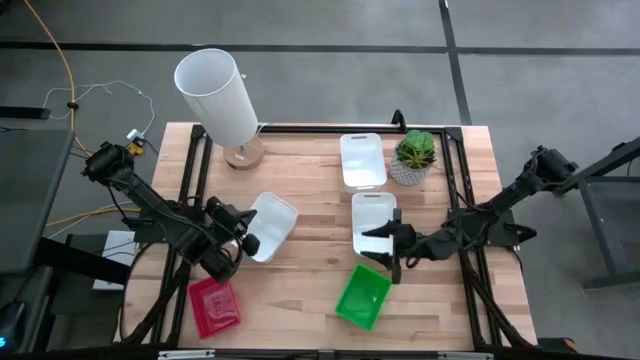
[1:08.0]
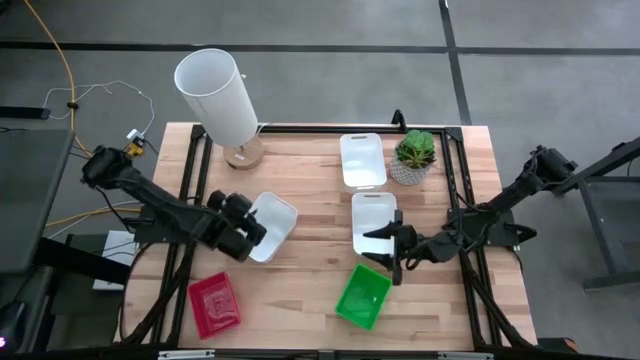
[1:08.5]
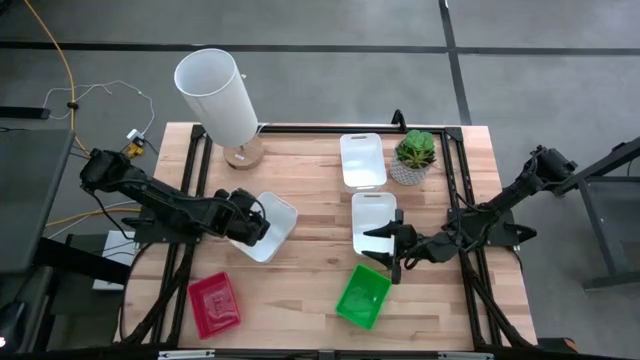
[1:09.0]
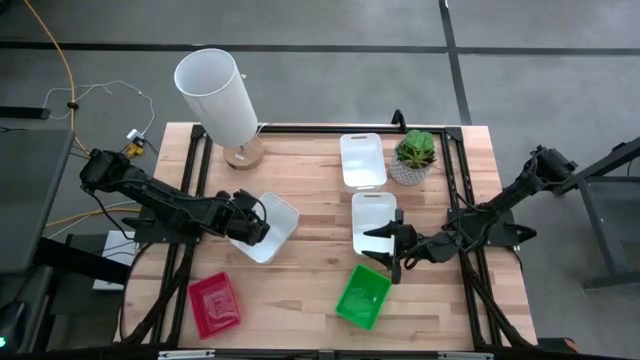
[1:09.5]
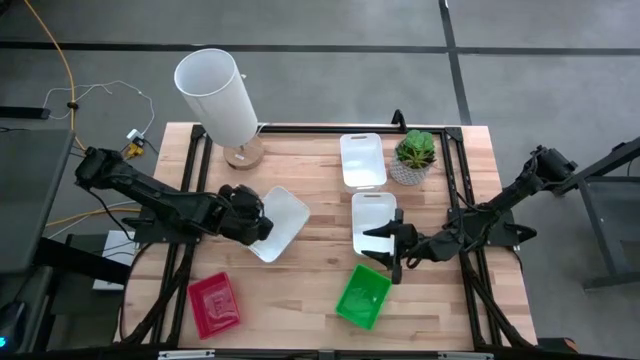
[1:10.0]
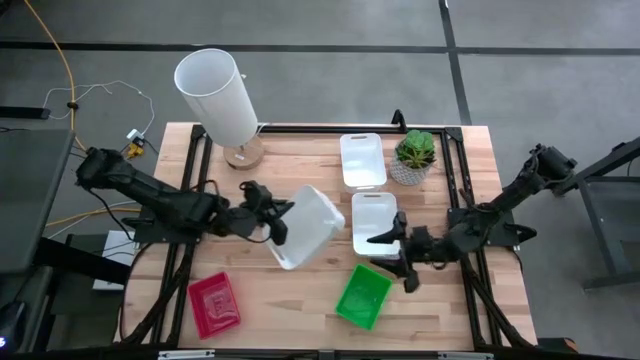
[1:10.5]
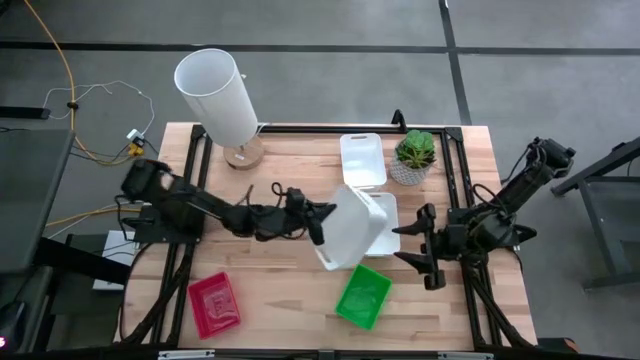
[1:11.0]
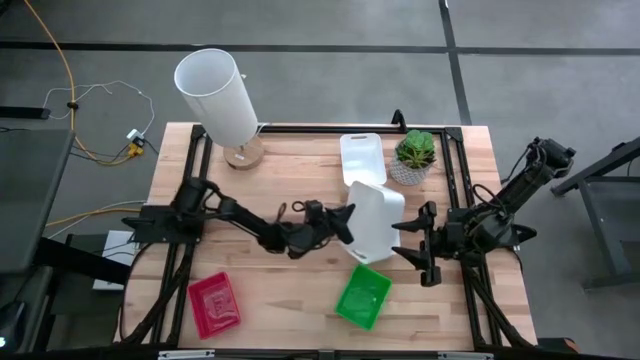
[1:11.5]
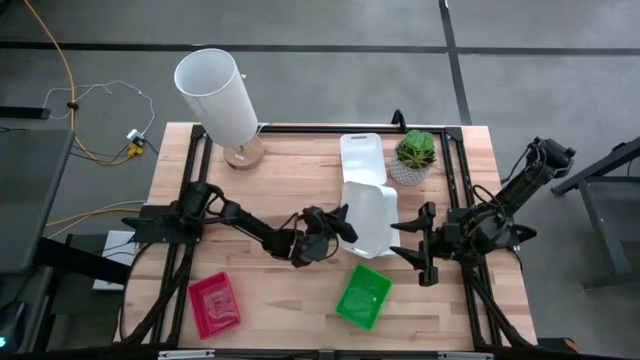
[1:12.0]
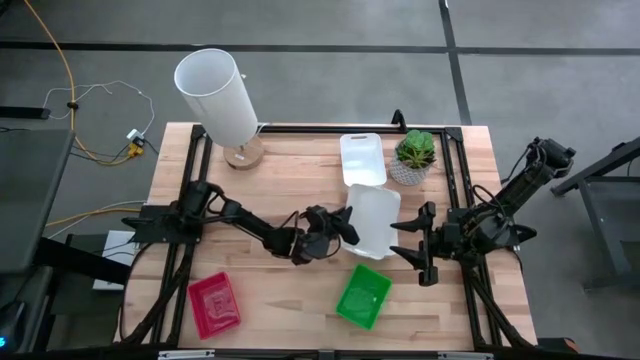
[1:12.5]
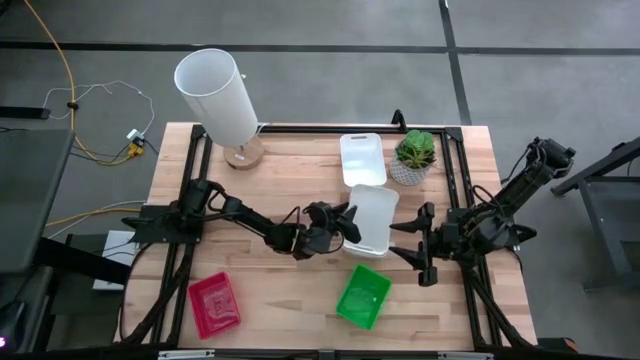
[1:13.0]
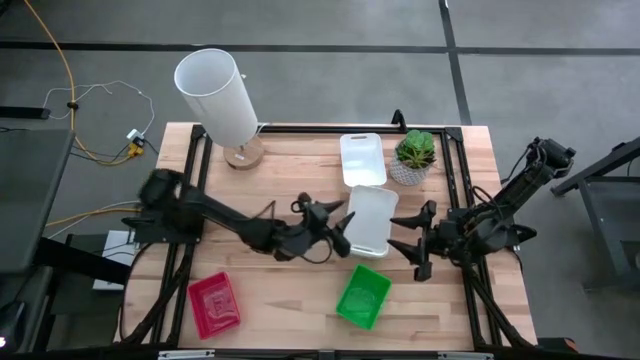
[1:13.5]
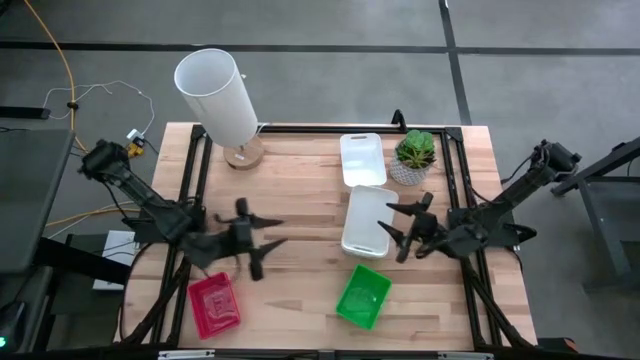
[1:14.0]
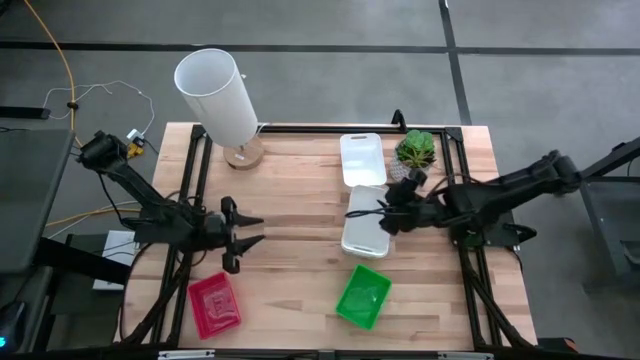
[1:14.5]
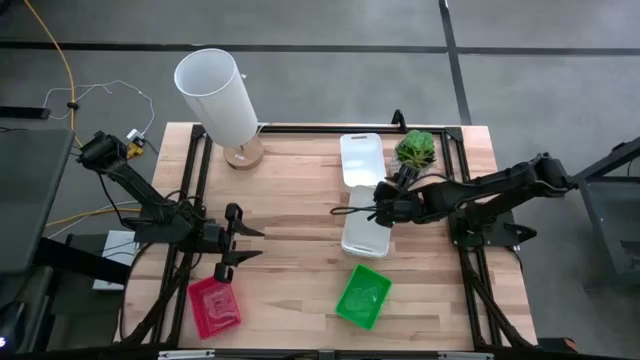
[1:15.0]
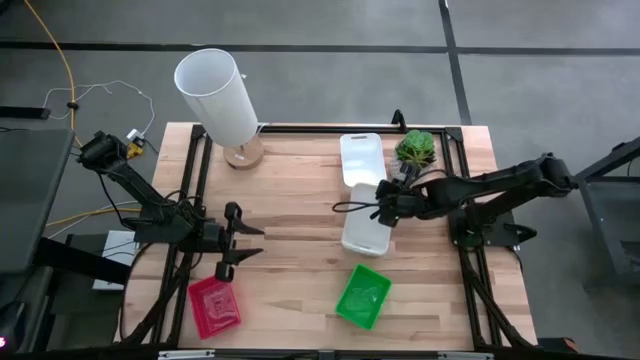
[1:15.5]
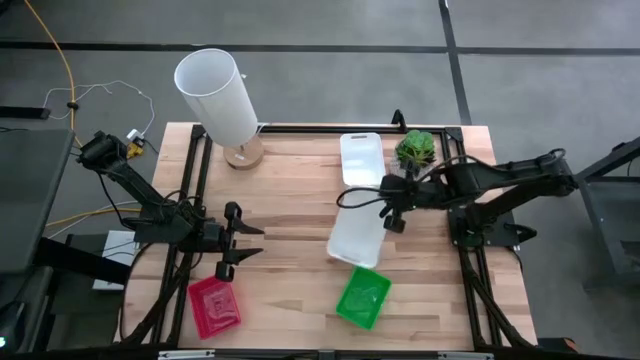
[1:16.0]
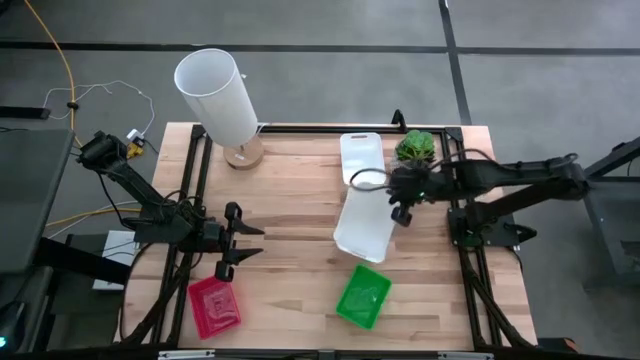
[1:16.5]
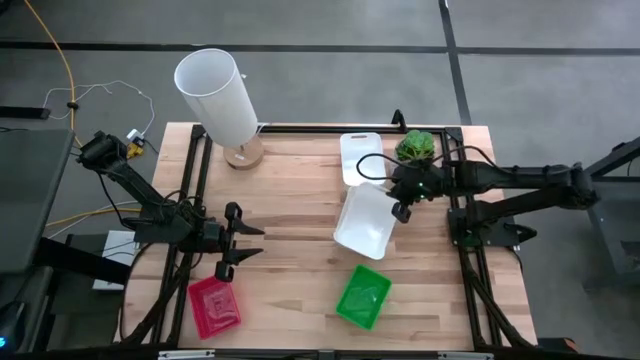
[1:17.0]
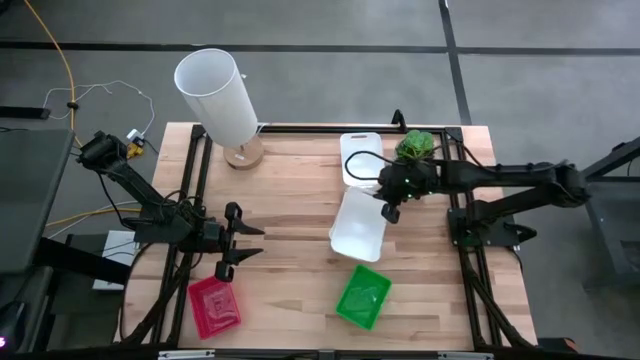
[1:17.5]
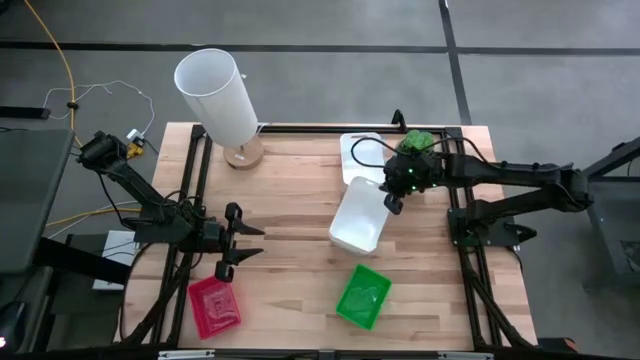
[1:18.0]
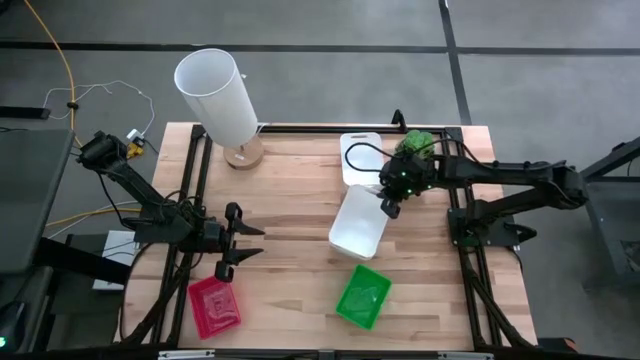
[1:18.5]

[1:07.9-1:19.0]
Stack the bottom left white bin on the bottom right white bin

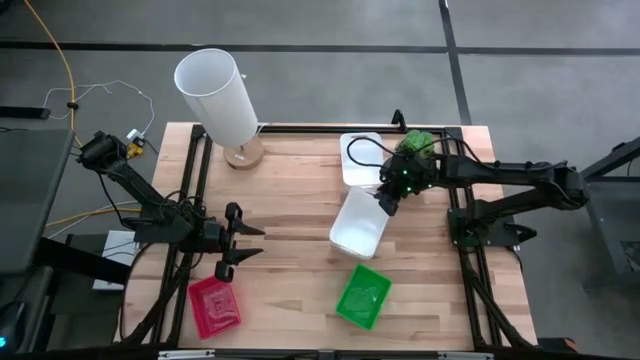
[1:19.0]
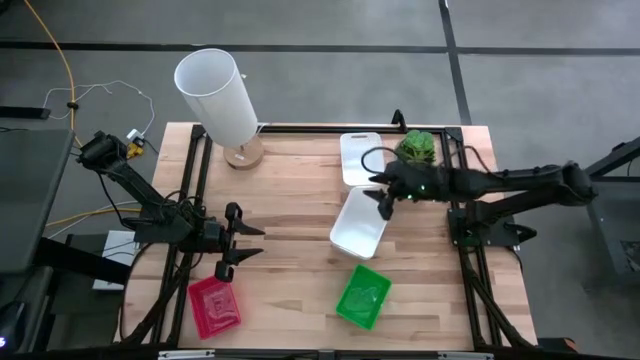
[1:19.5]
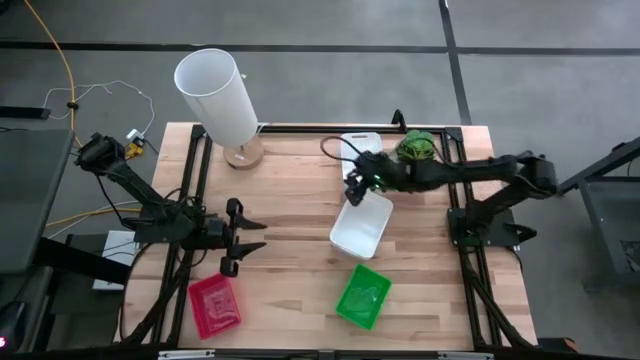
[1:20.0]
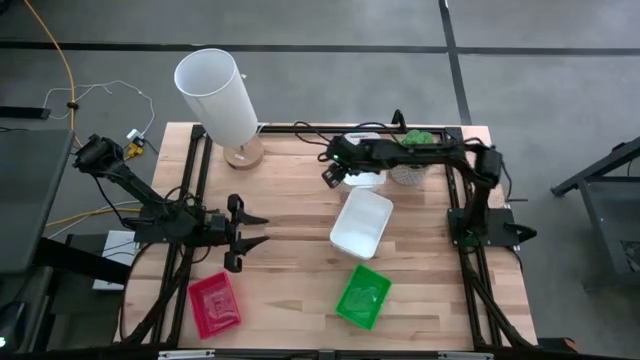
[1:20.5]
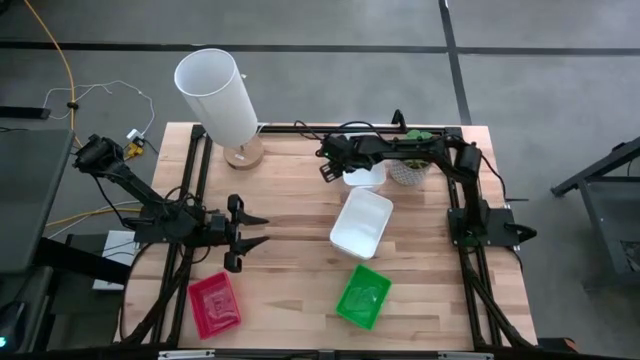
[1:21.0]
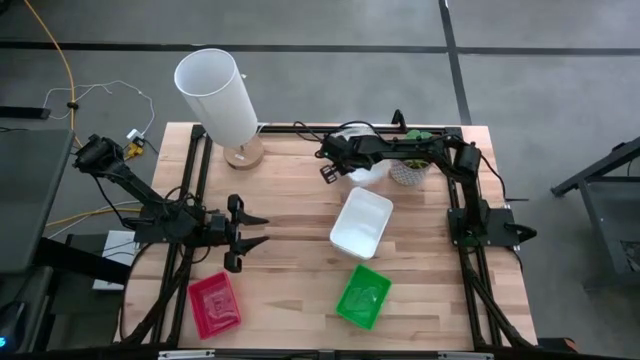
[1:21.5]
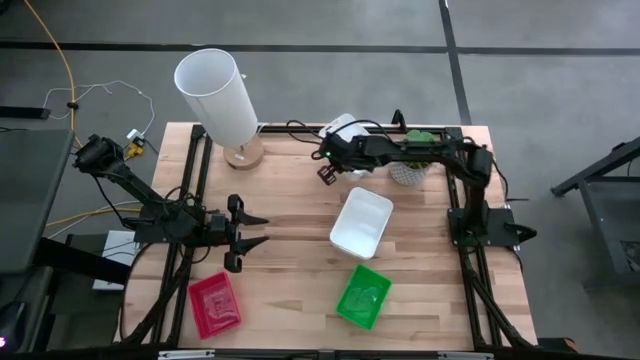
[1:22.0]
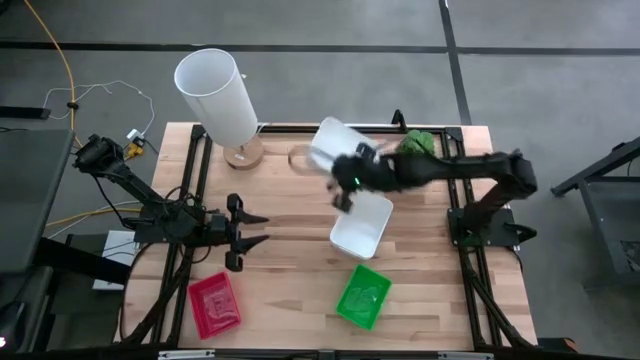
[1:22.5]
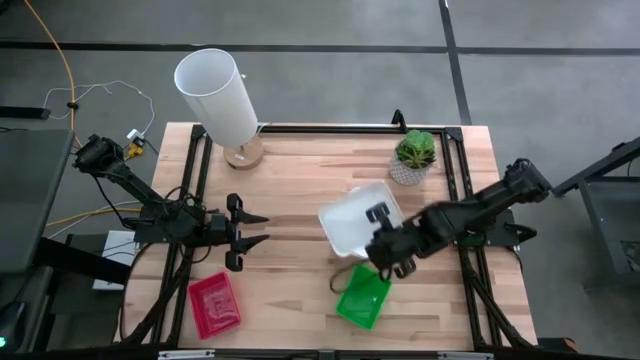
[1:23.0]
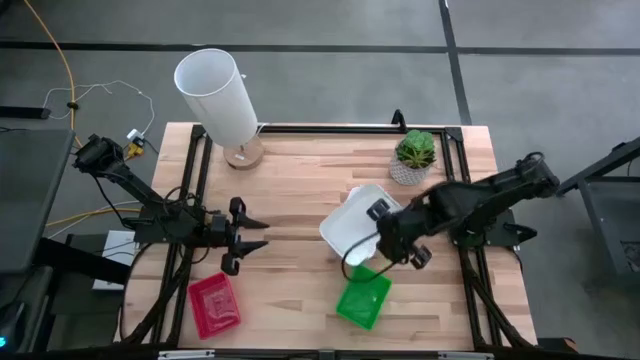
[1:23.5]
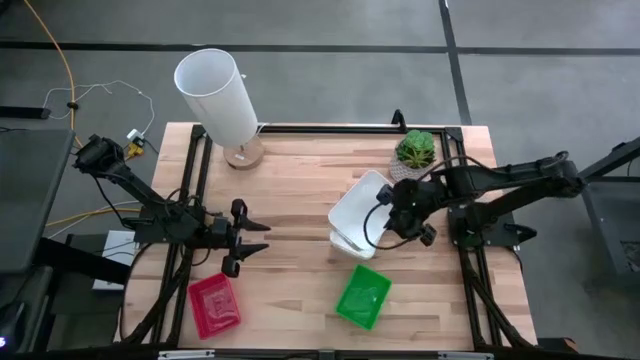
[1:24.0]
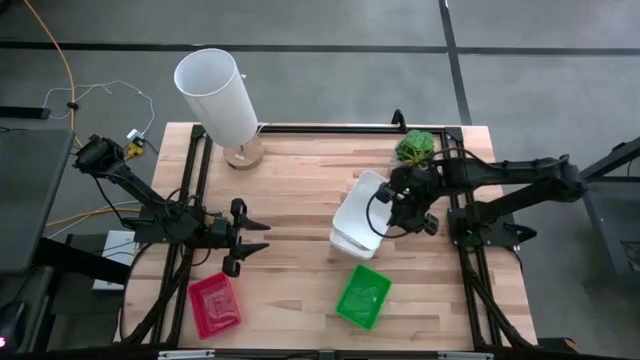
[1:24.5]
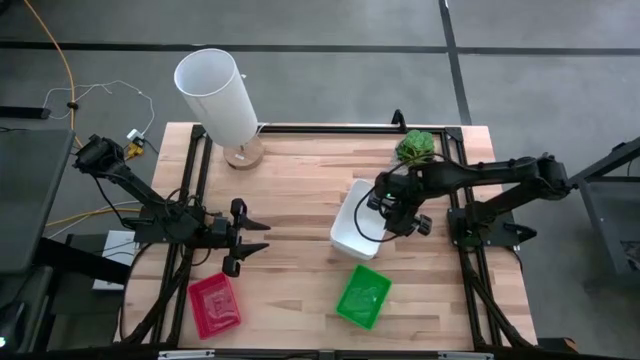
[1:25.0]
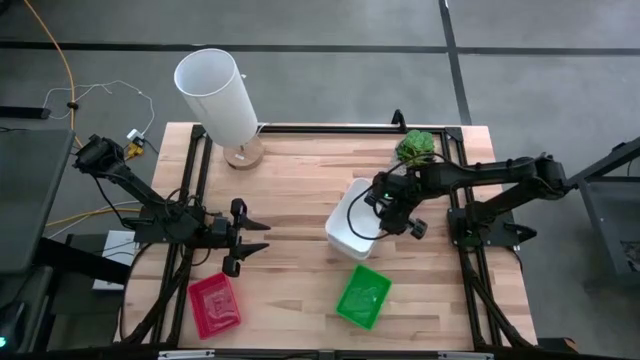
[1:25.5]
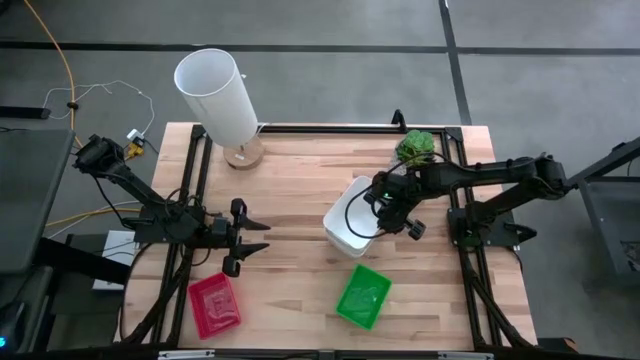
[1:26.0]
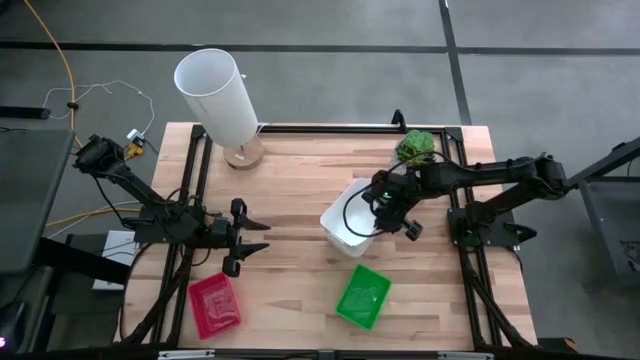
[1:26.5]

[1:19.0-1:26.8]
Stack the top white bin on the bottom white bin

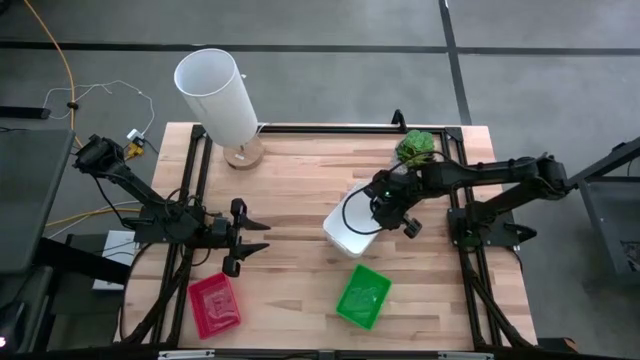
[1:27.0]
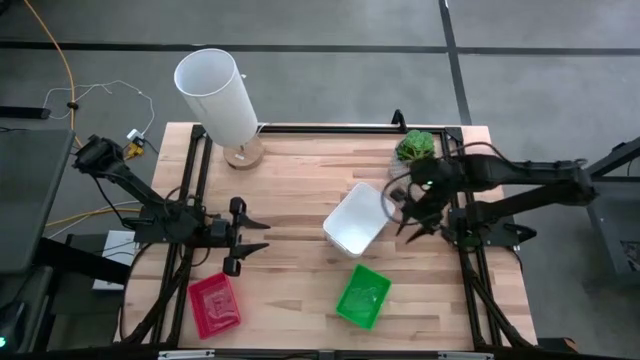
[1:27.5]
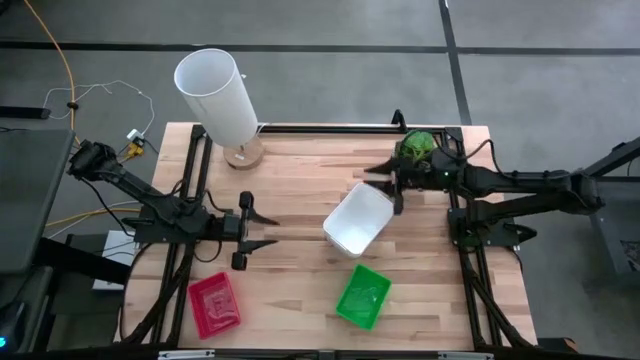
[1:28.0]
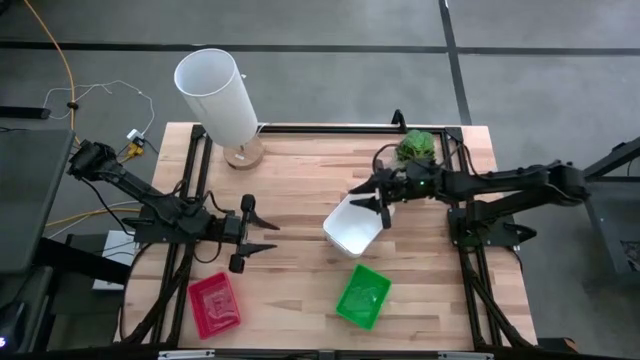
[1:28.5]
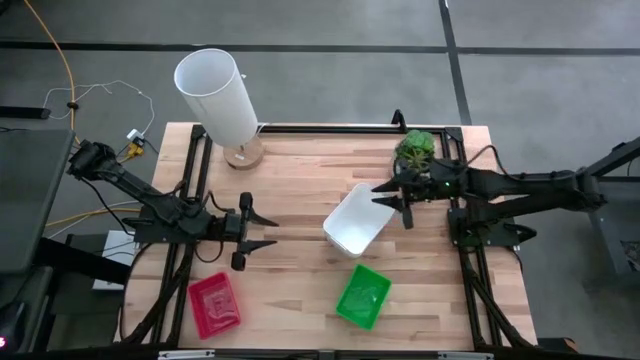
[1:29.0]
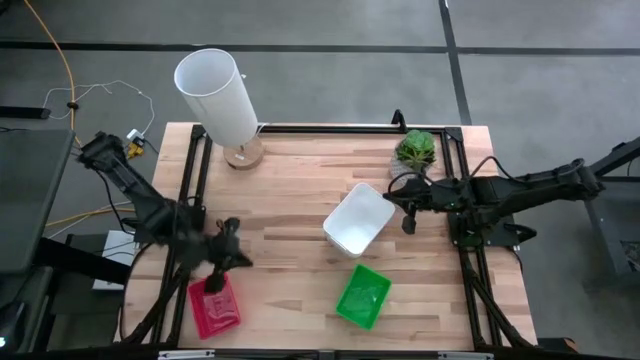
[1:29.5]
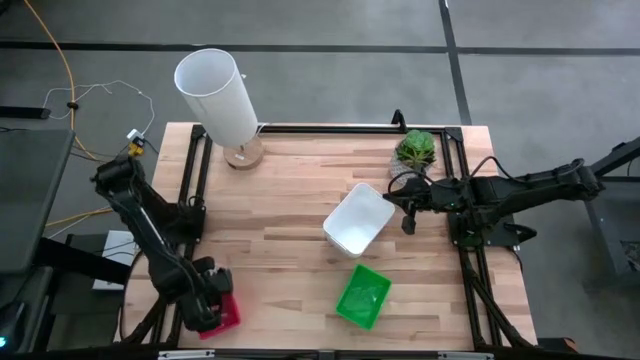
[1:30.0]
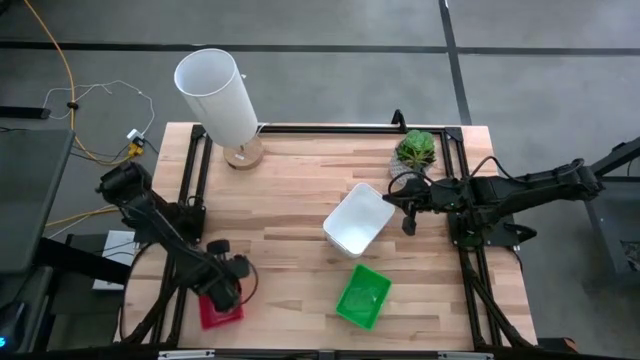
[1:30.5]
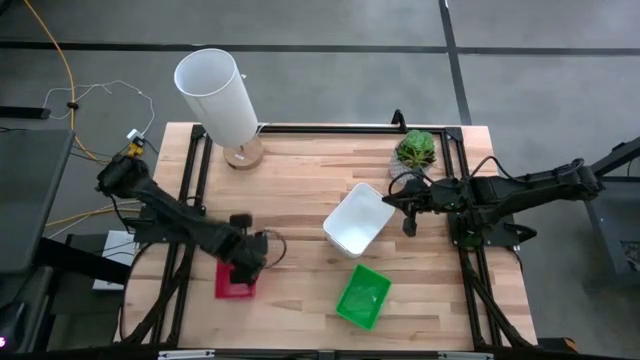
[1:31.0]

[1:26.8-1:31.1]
Adjust the red bins
